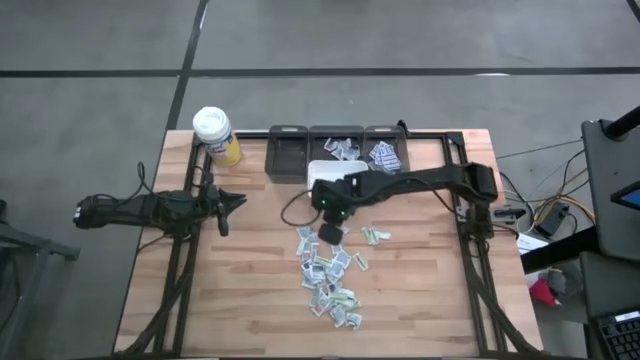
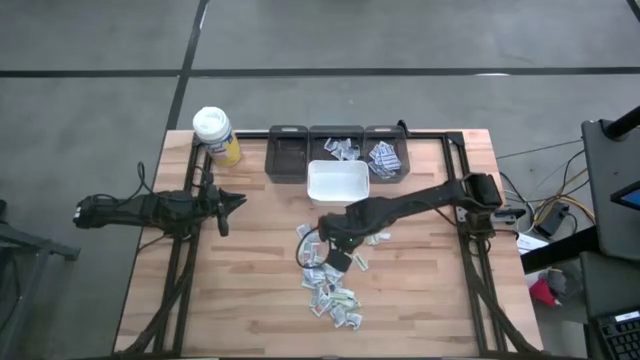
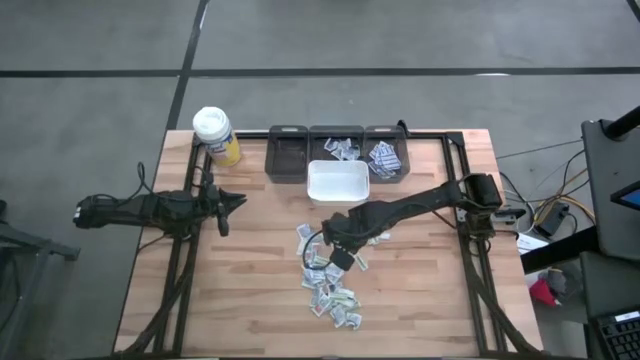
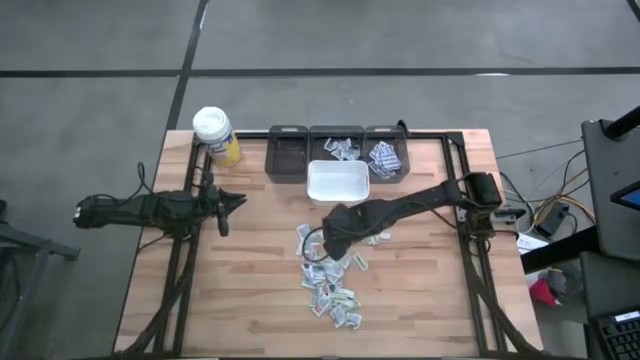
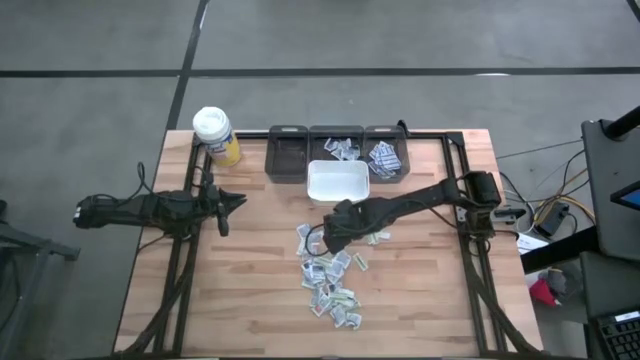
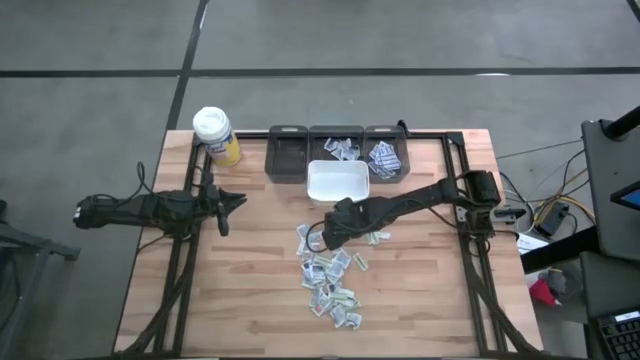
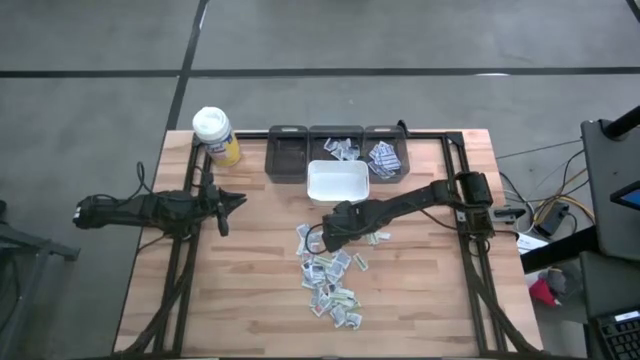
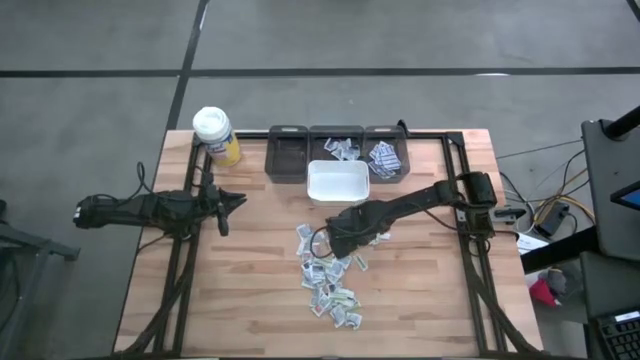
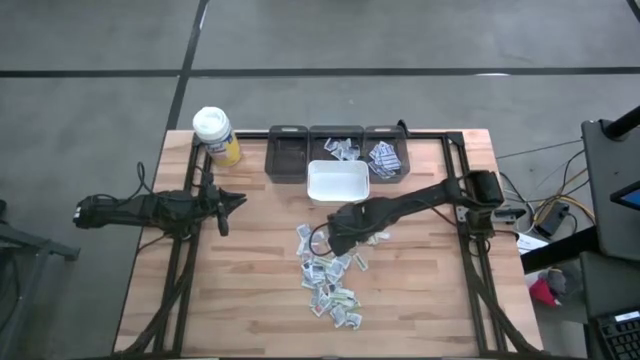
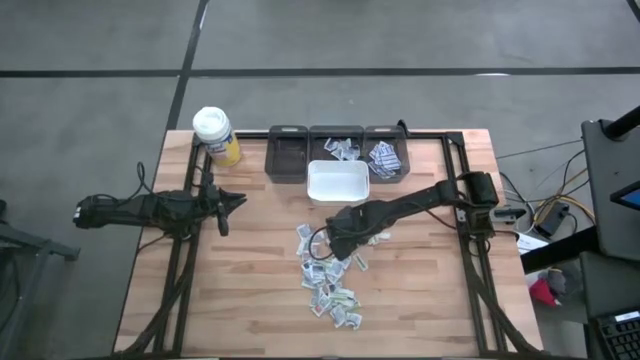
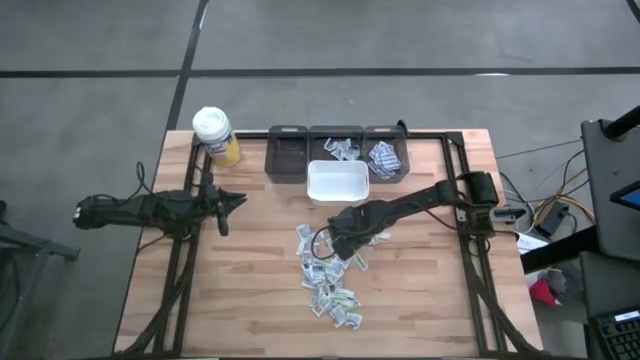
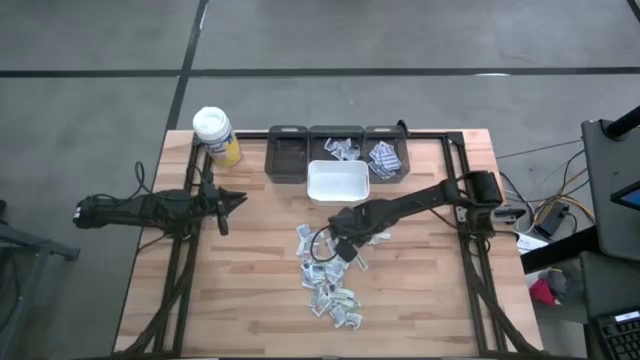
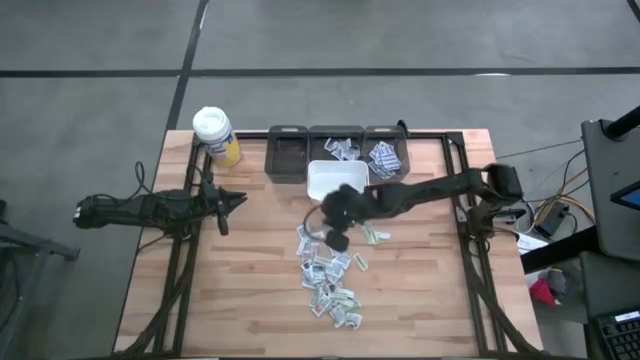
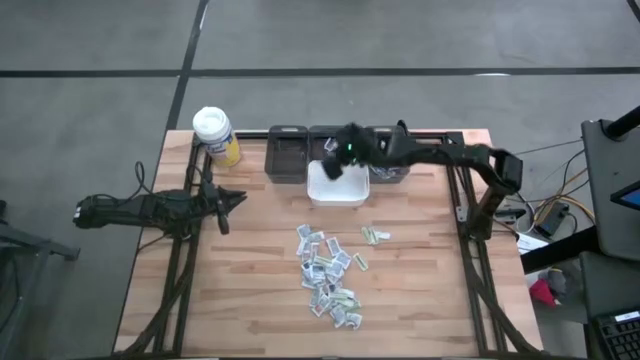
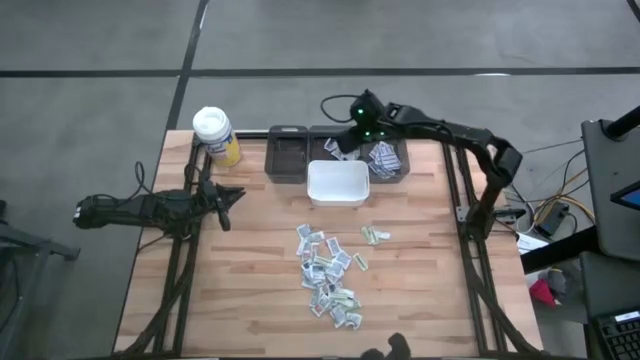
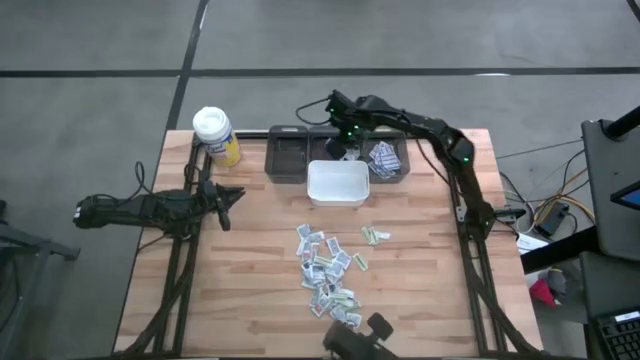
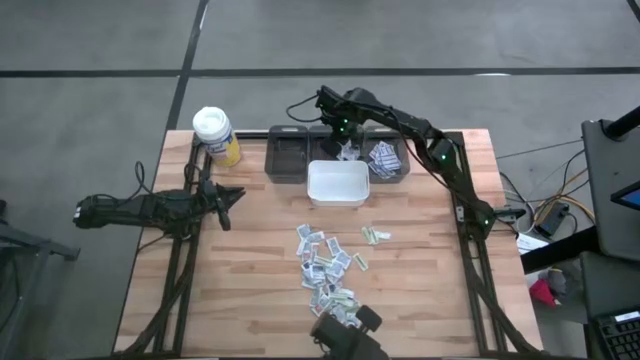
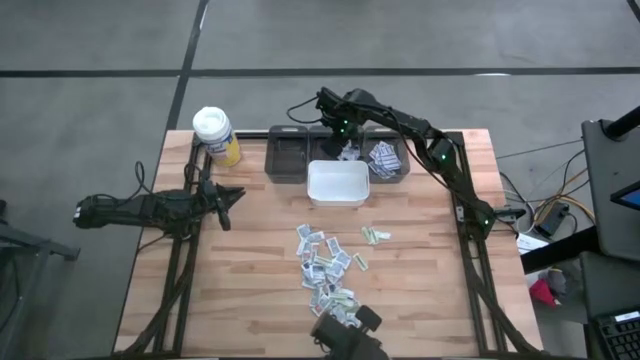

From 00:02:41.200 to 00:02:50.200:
Task: Pick & Place First Aid Supplies
Put the alcohol pad into the middle black bin

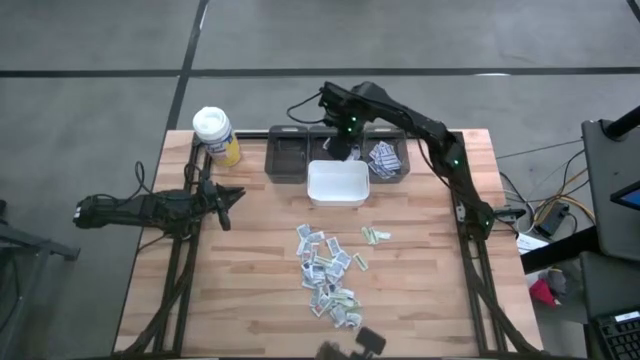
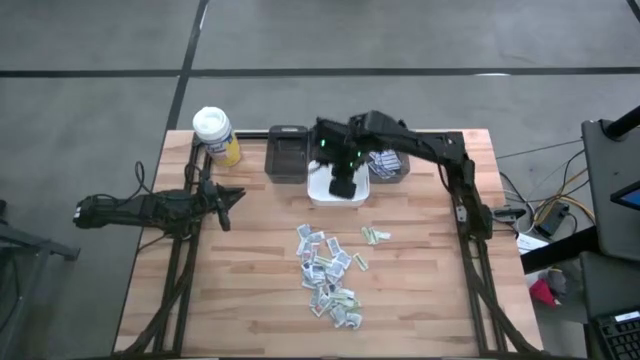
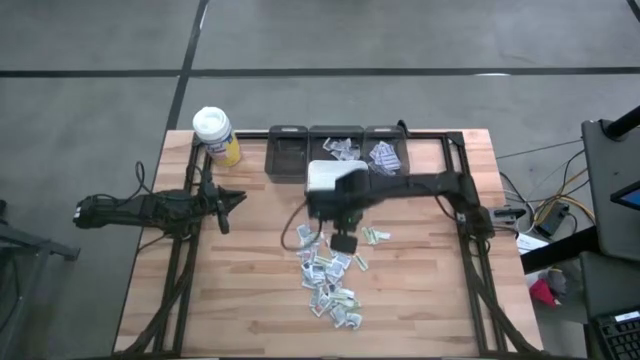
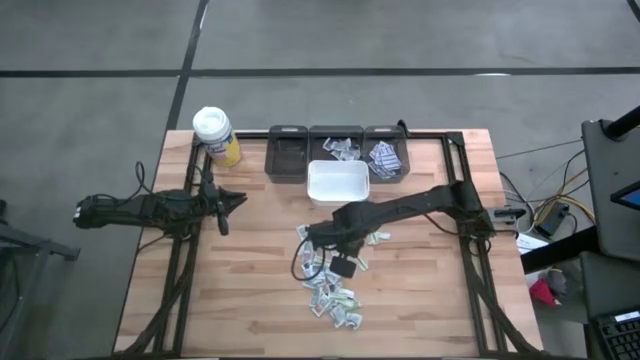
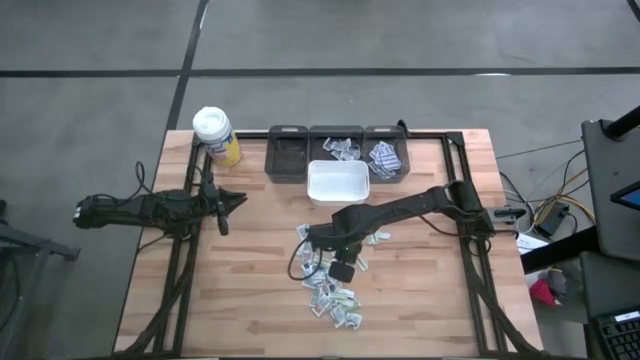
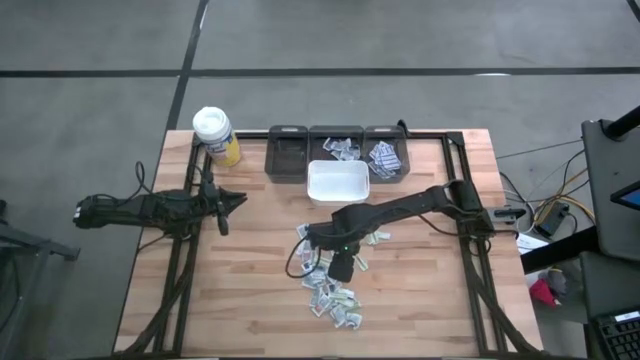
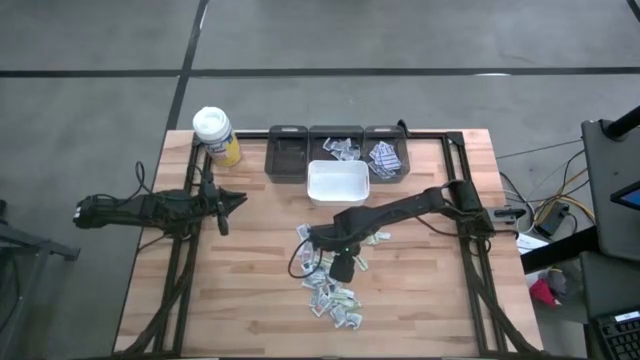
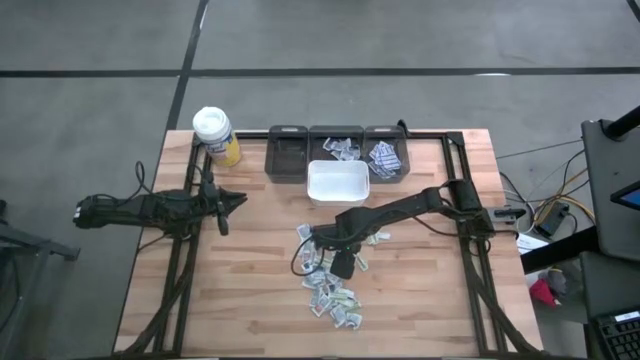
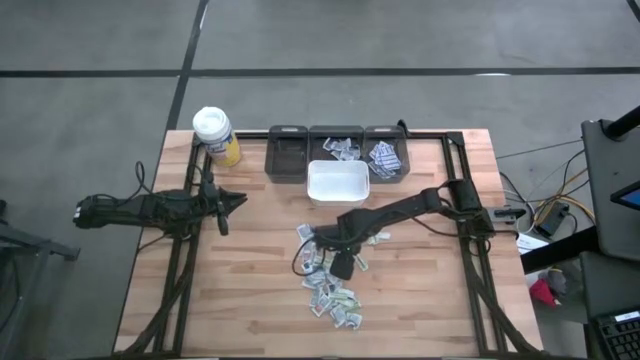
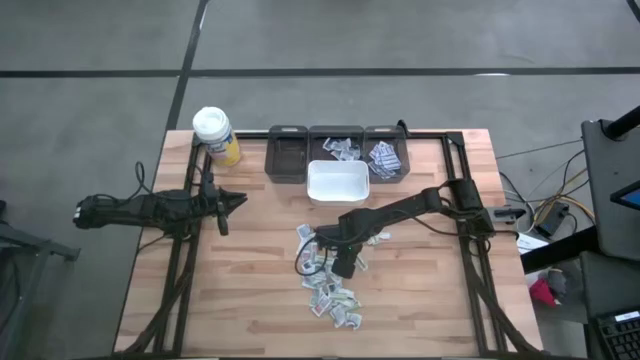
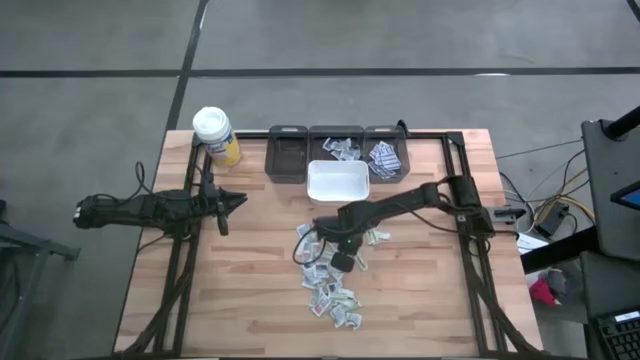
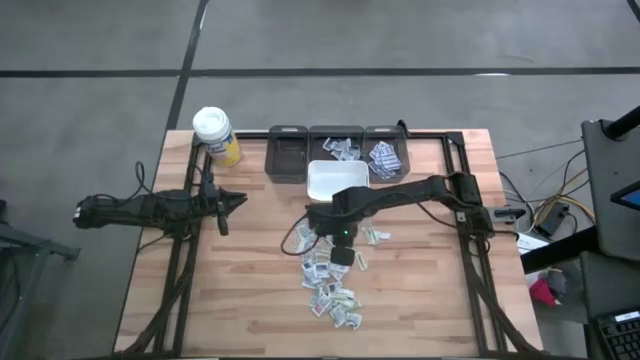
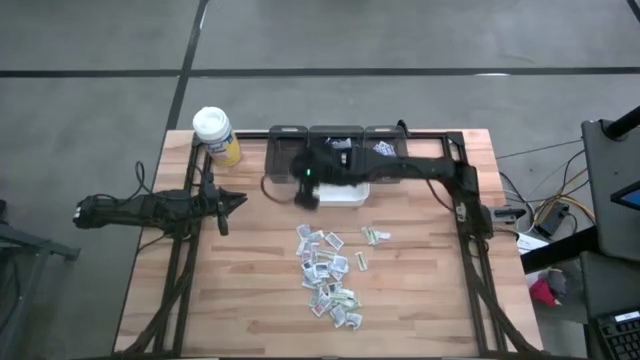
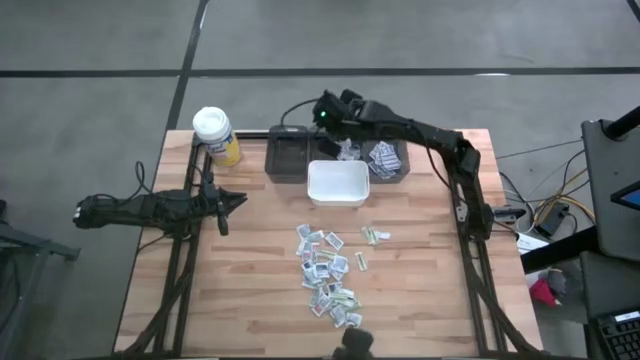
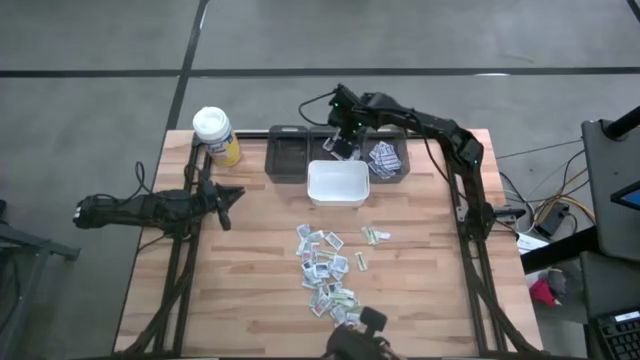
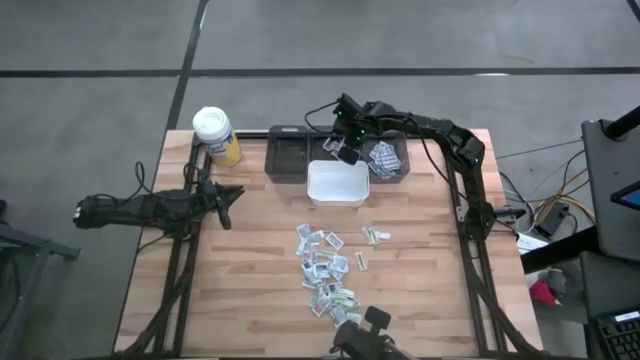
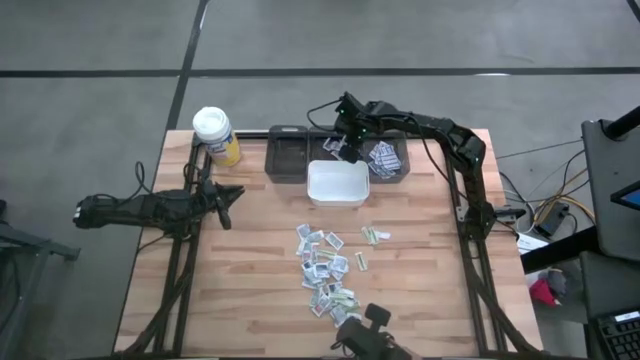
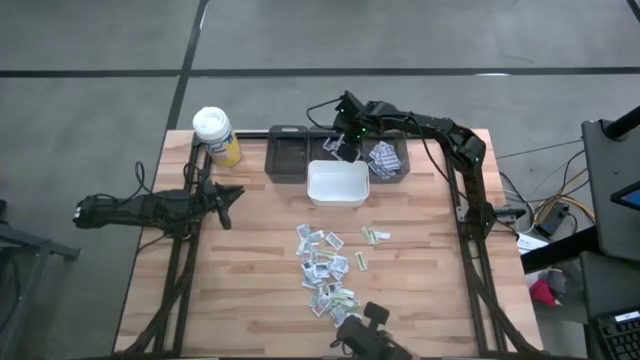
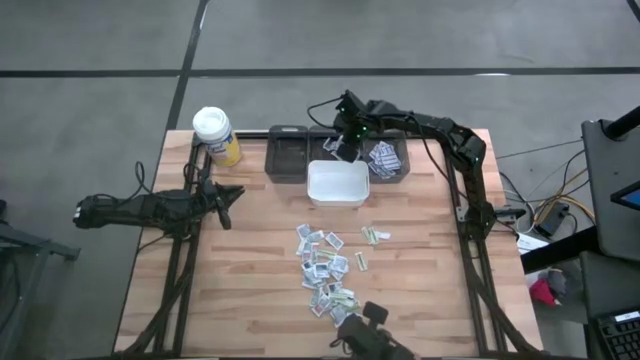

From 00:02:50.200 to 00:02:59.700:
Put the alcohol pad into the middle black bin
